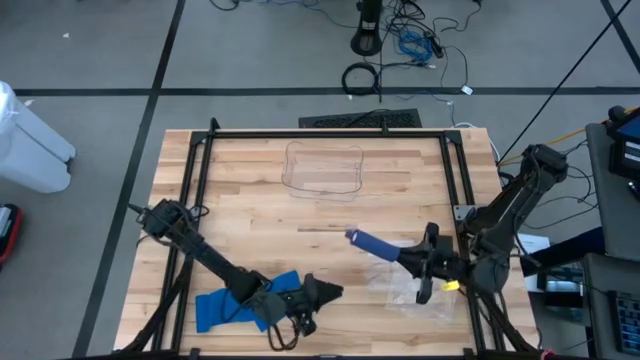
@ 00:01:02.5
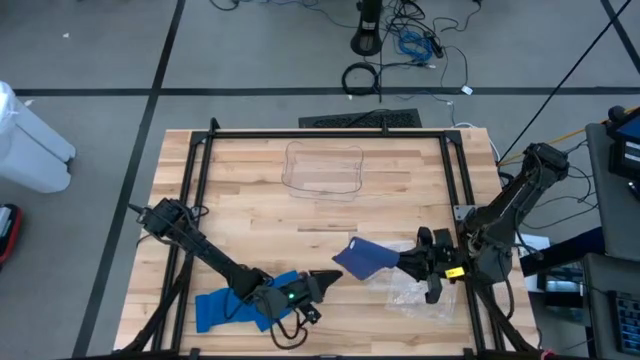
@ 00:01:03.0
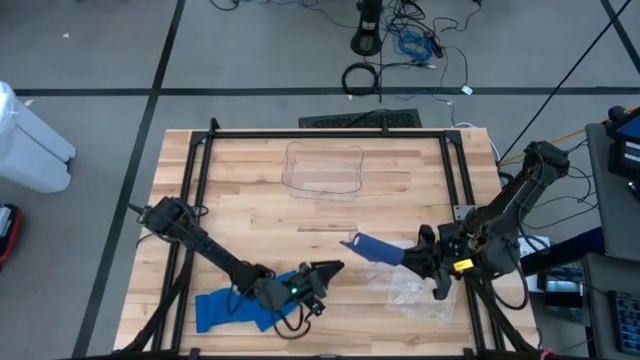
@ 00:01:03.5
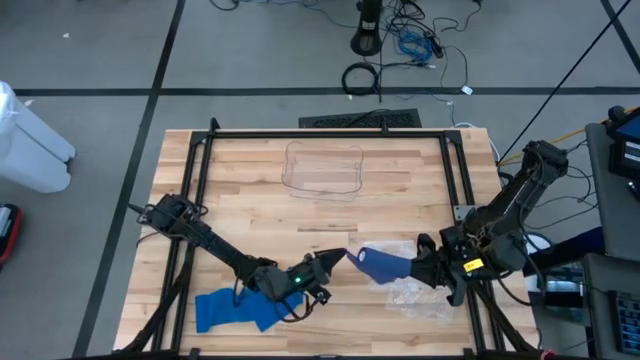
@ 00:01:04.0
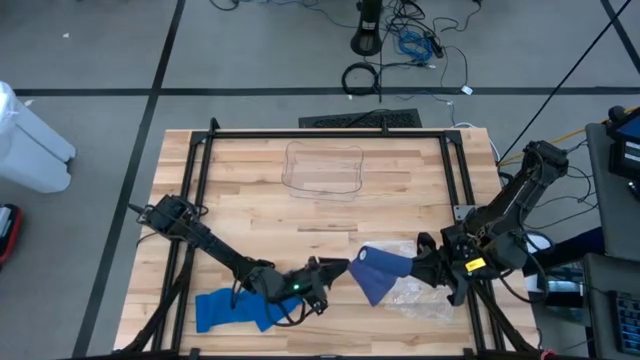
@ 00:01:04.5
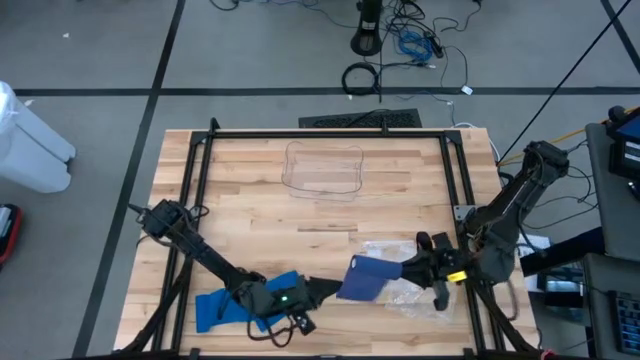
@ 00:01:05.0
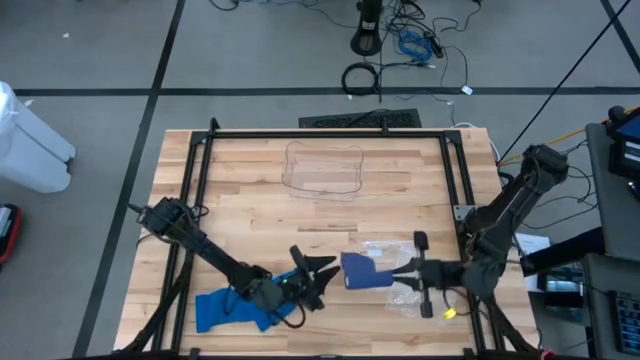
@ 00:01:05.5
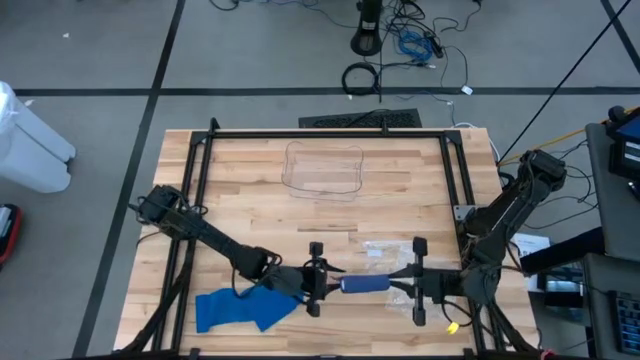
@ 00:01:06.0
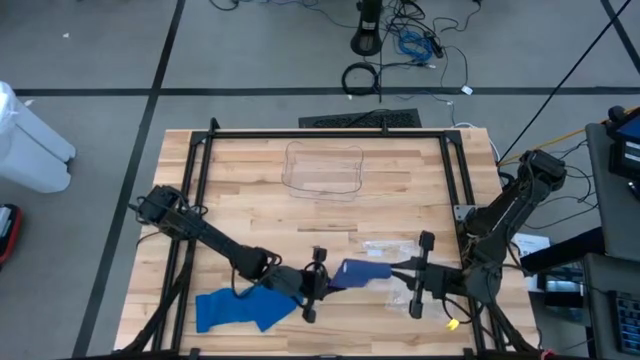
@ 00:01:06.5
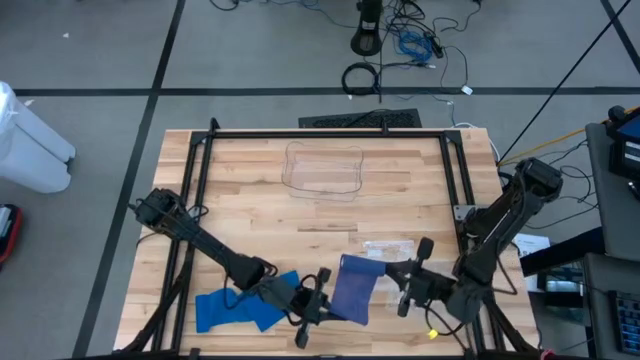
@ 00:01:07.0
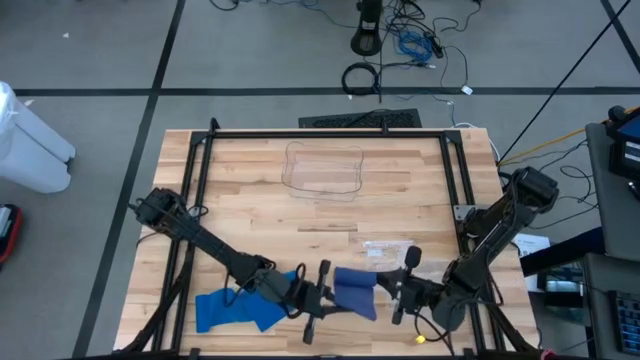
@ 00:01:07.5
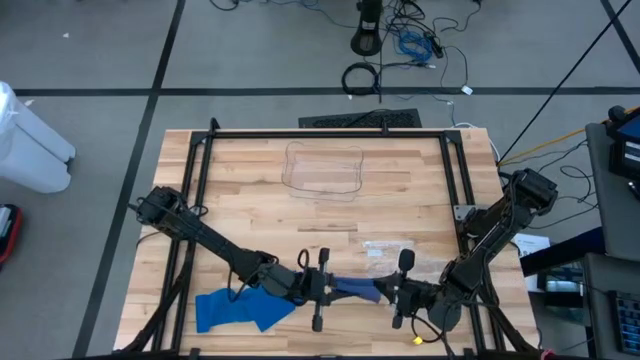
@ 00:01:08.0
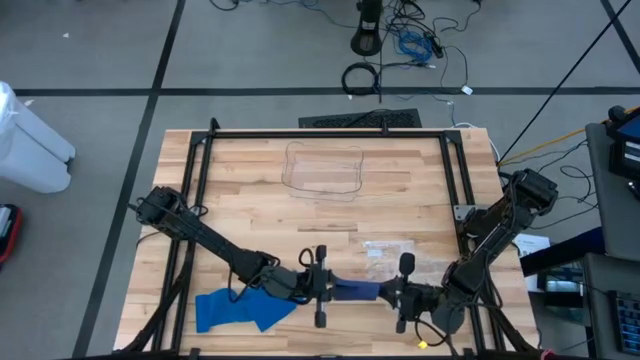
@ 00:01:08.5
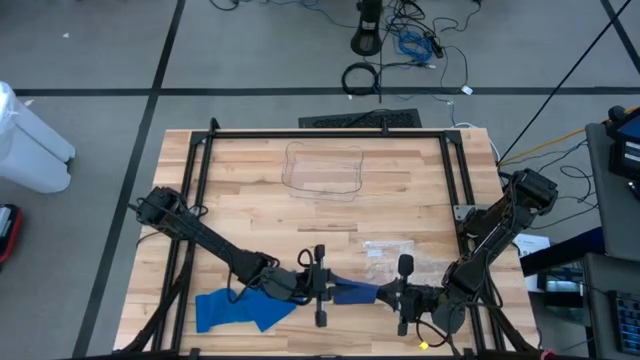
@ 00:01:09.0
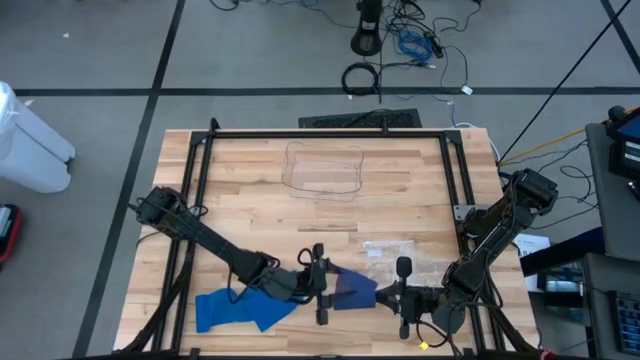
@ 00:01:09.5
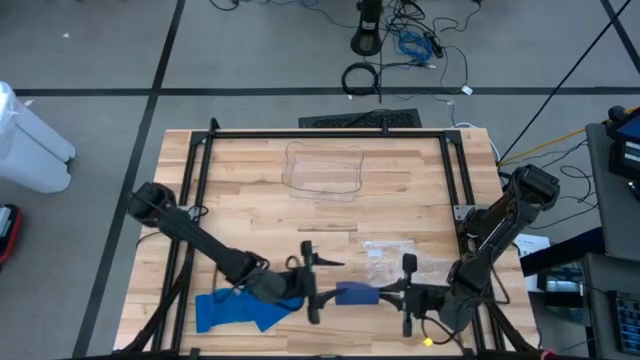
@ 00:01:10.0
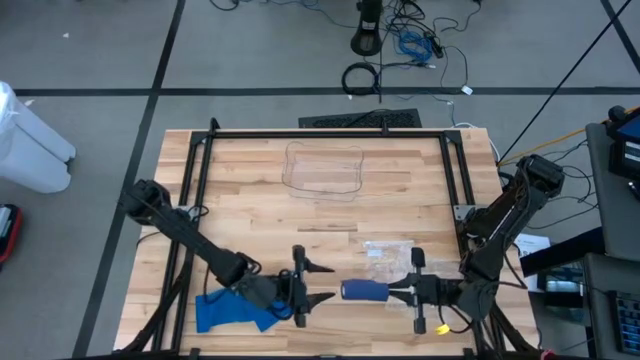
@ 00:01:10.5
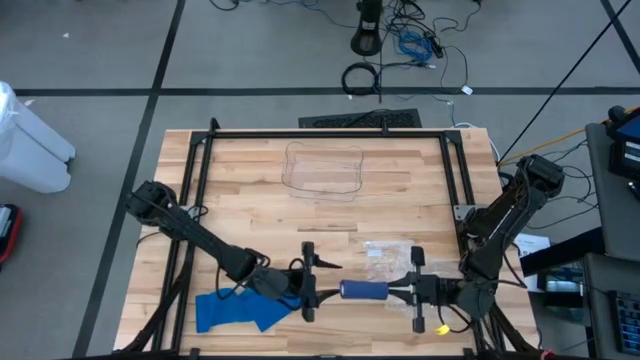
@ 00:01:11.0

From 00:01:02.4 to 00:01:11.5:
Task: Roll bandage
Roll the purple bandage

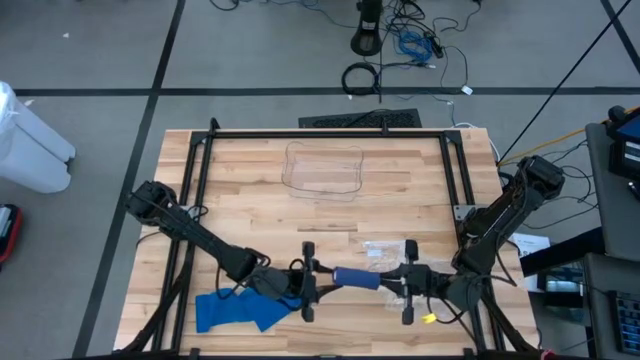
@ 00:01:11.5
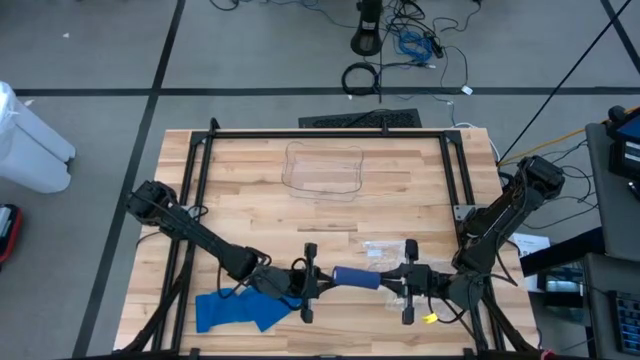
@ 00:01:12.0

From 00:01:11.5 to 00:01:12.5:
Roll the purple bandage

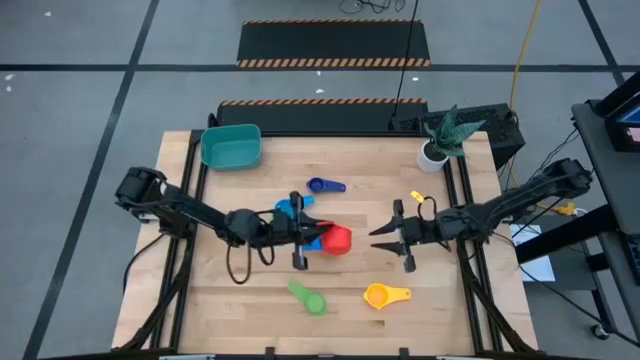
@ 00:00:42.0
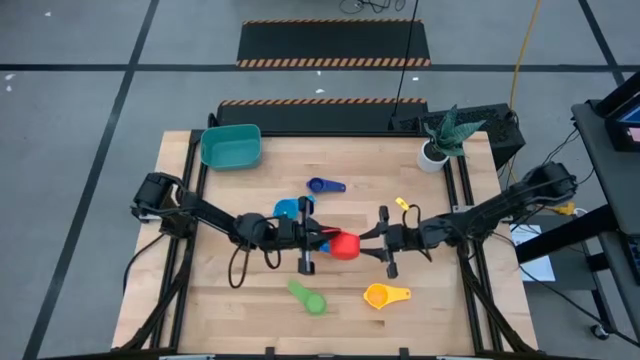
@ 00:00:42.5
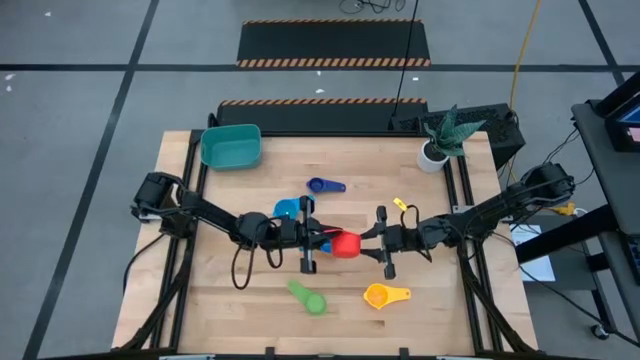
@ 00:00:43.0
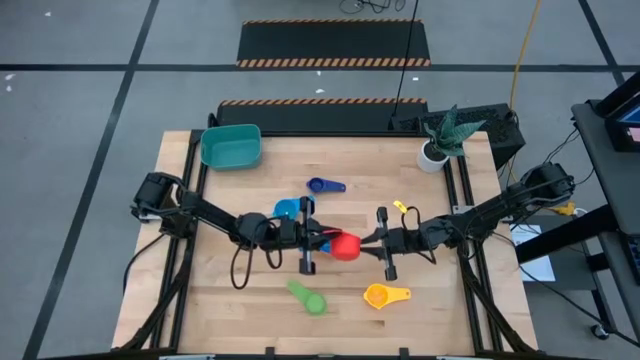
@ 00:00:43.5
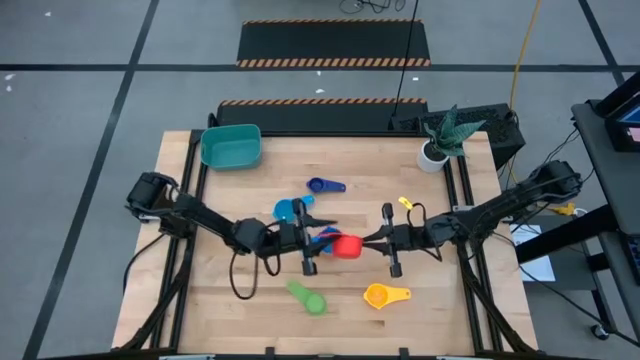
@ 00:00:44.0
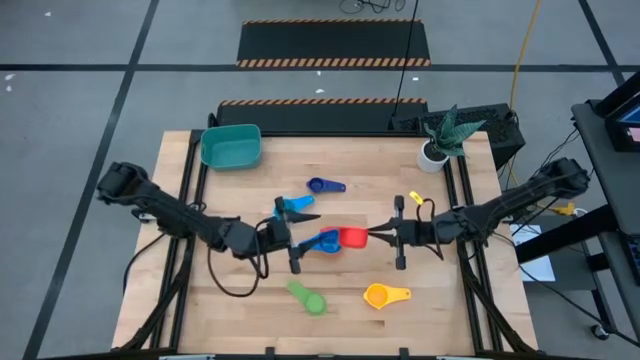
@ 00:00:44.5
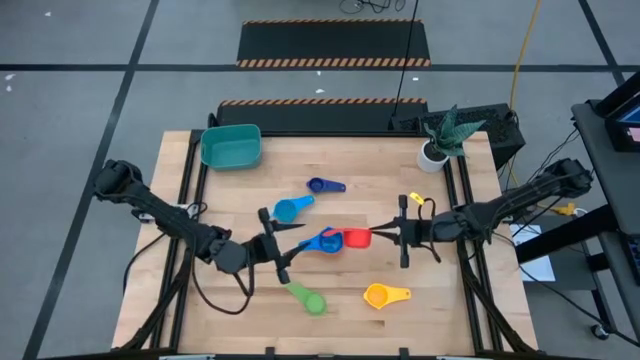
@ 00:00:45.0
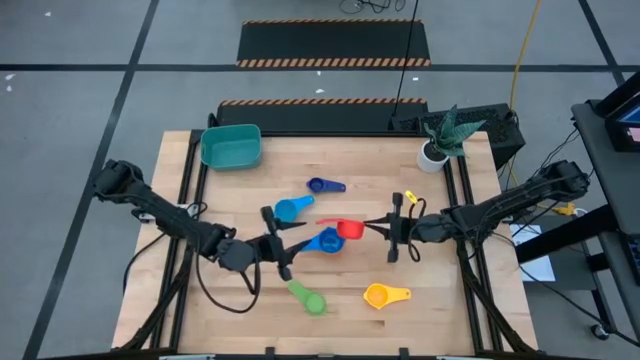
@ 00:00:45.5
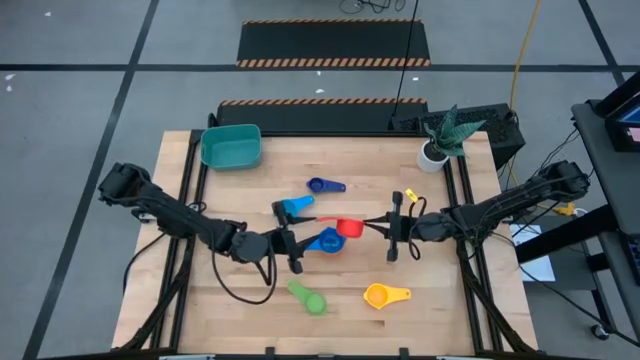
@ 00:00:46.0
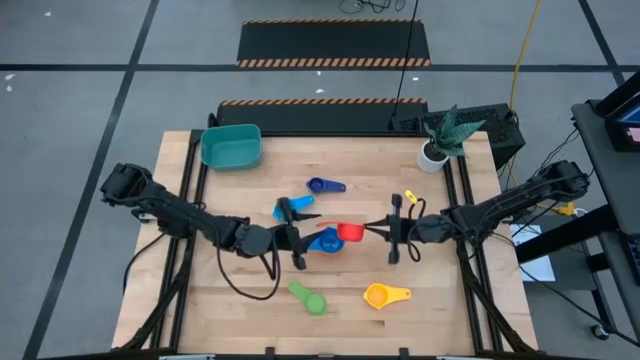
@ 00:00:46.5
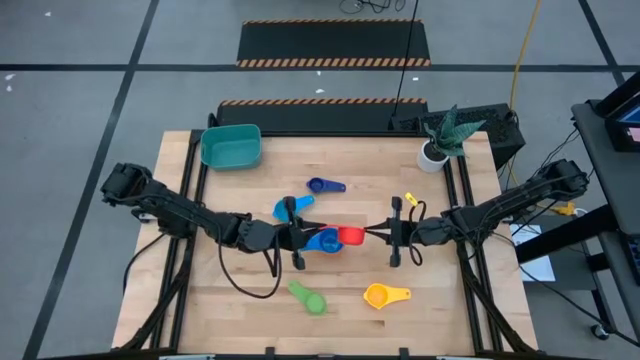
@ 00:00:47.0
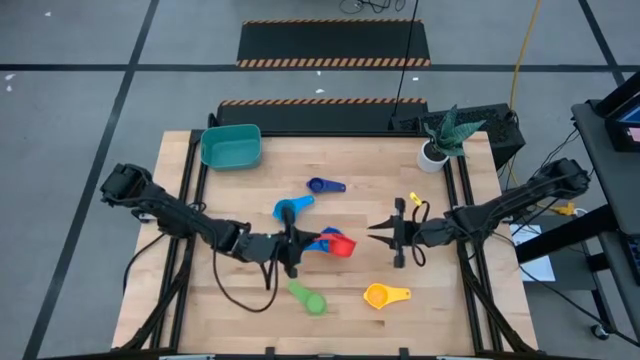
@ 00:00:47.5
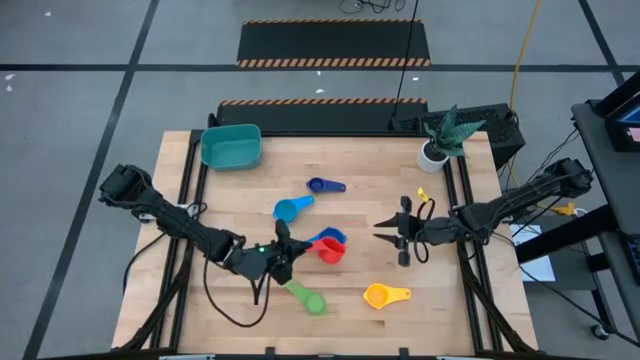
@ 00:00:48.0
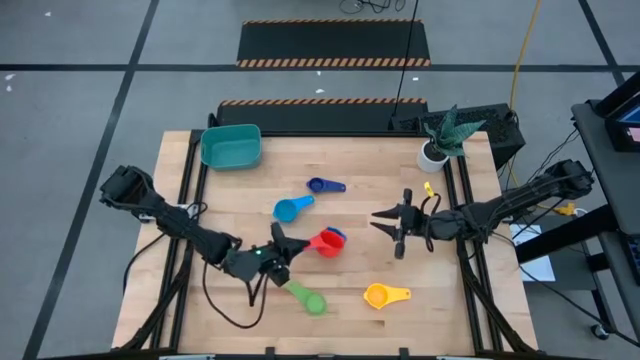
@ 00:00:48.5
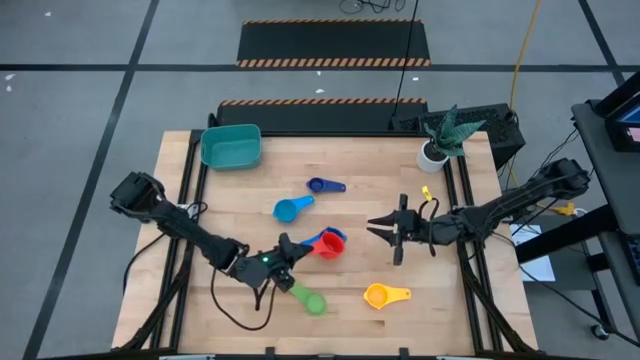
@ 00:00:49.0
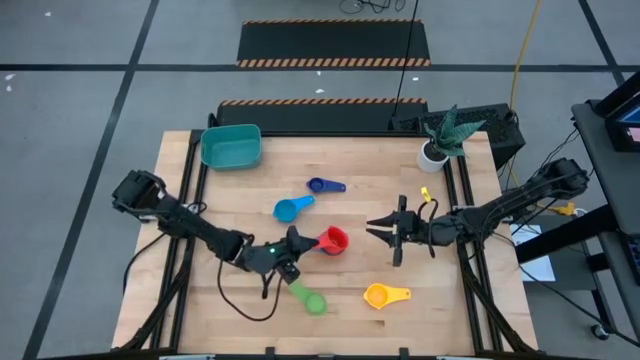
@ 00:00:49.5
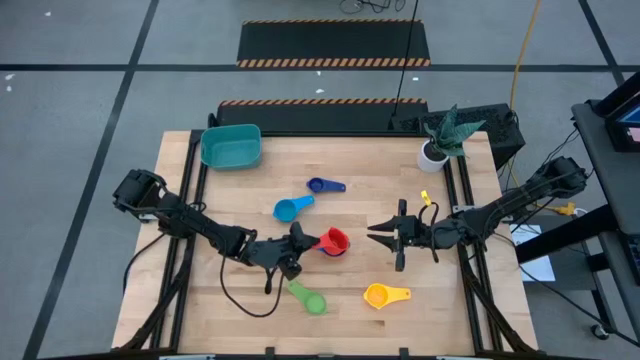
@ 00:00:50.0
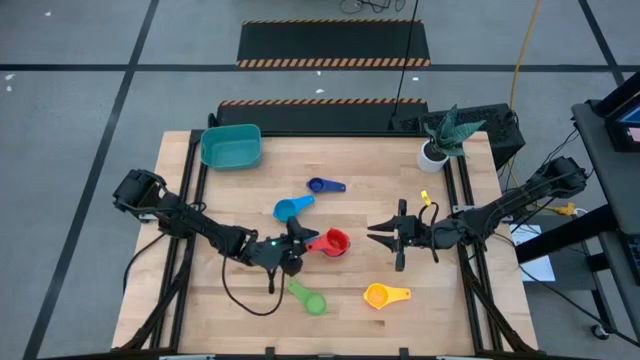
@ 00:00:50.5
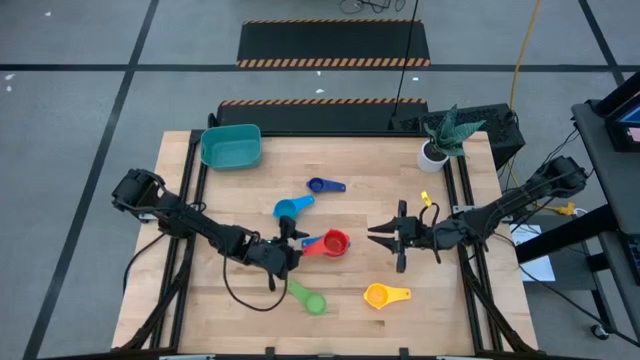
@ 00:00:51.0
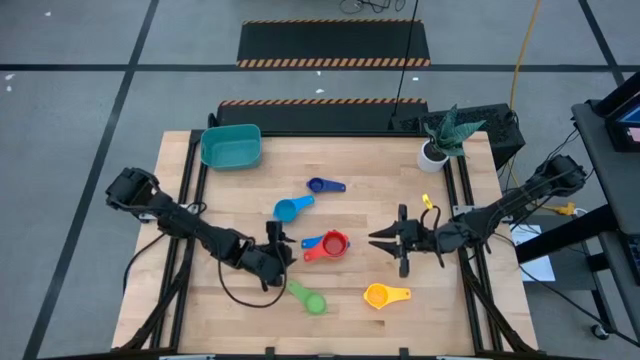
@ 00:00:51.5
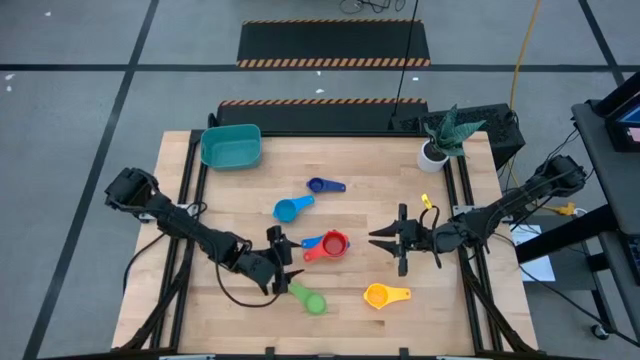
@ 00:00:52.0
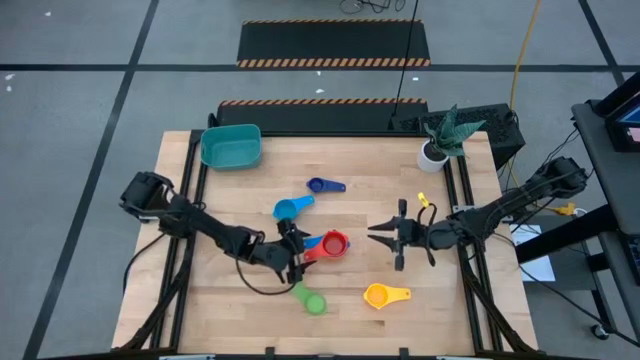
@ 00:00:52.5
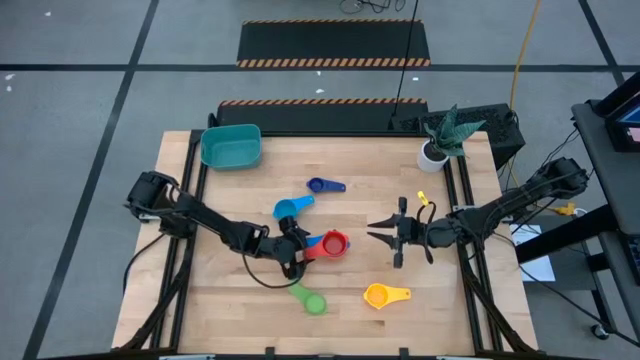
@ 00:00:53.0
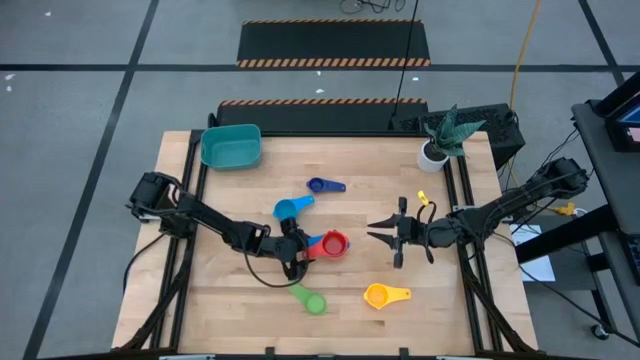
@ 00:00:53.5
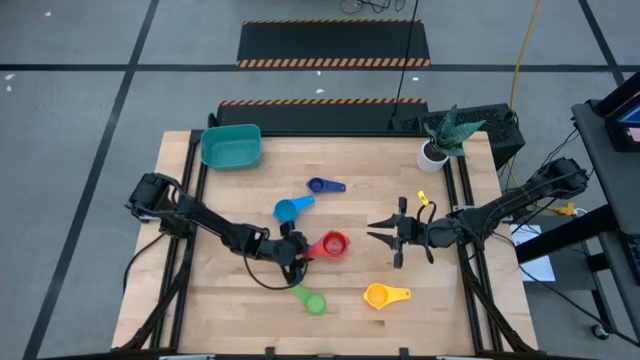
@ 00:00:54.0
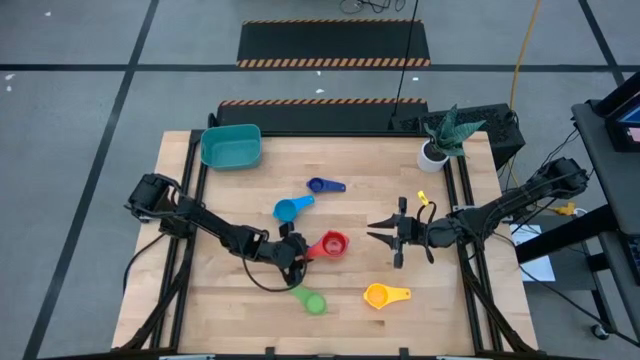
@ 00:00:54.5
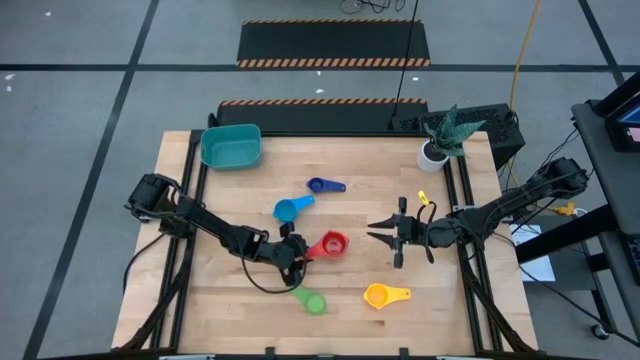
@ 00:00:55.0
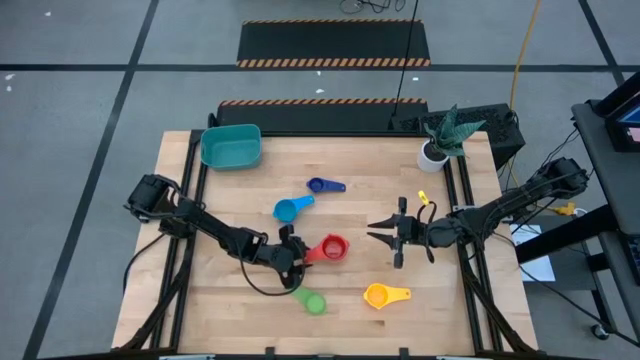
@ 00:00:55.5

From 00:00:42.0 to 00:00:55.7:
Task: Nest measuring cups in basket
Stack the red measuring cup on top of the light blue measuring cup
